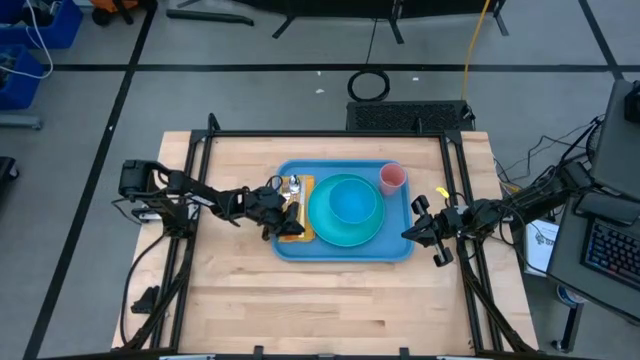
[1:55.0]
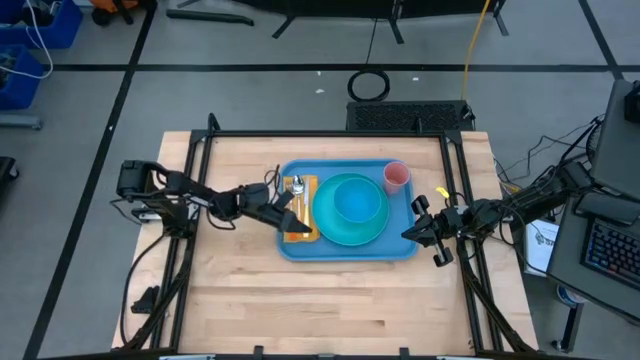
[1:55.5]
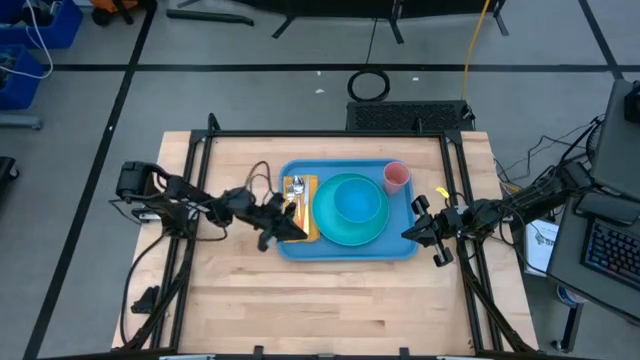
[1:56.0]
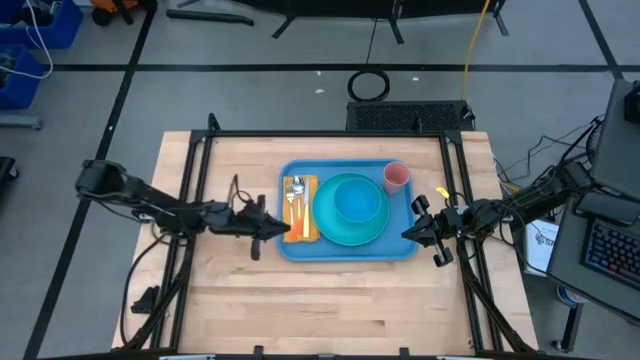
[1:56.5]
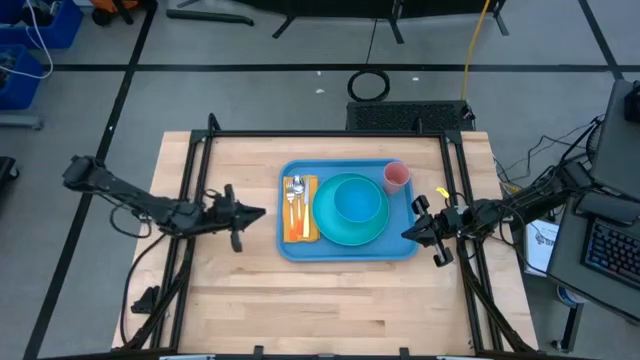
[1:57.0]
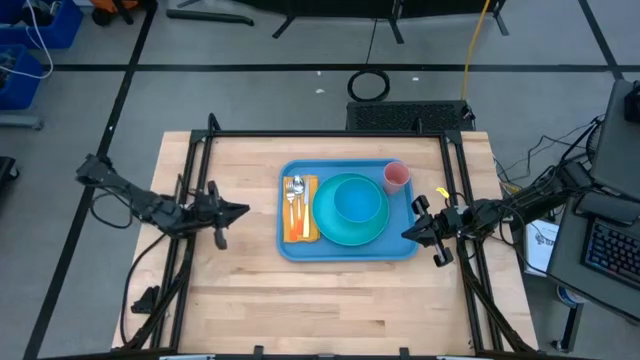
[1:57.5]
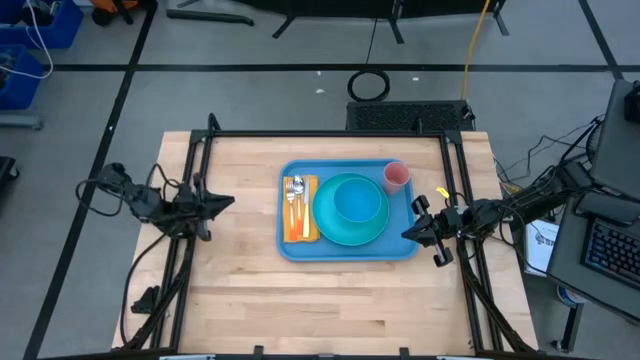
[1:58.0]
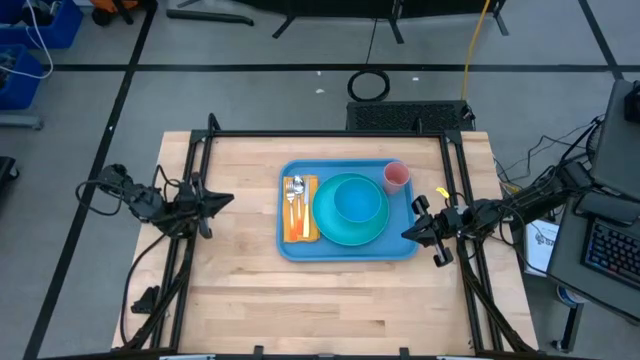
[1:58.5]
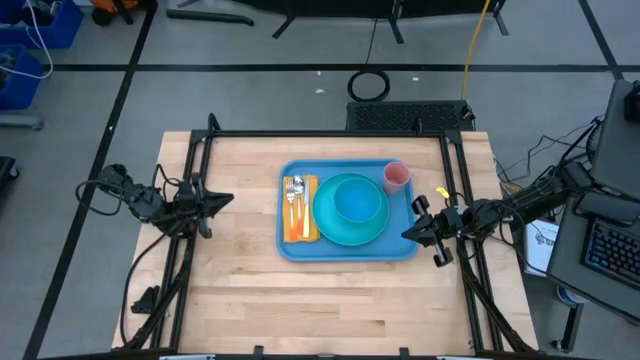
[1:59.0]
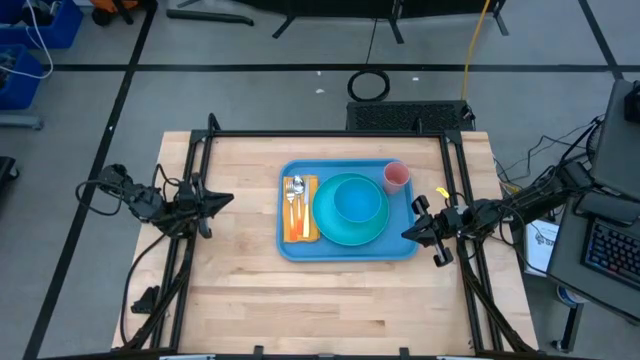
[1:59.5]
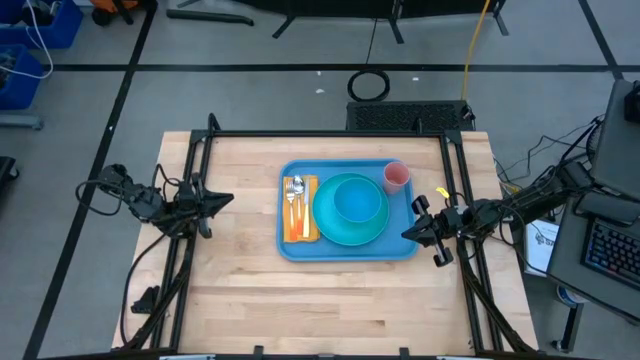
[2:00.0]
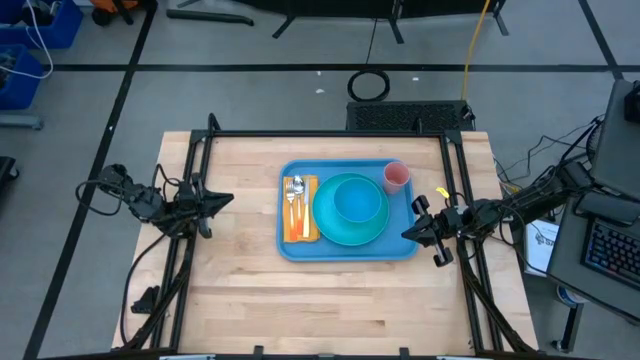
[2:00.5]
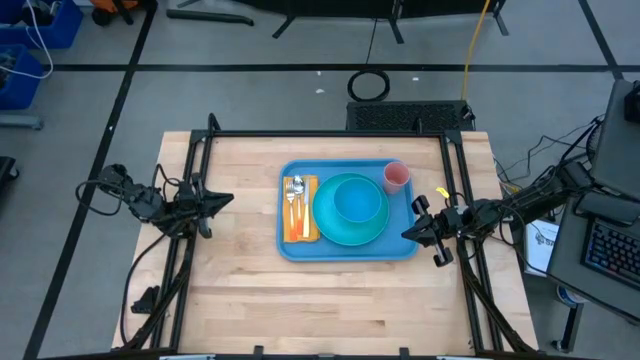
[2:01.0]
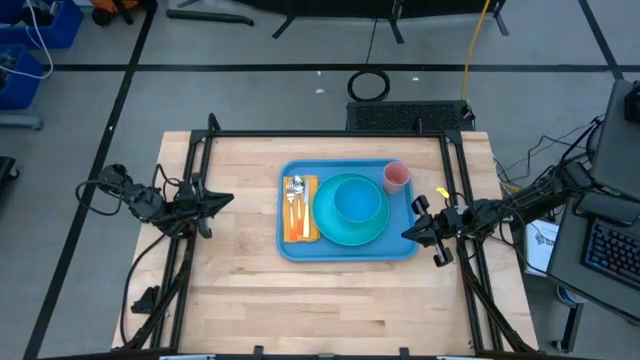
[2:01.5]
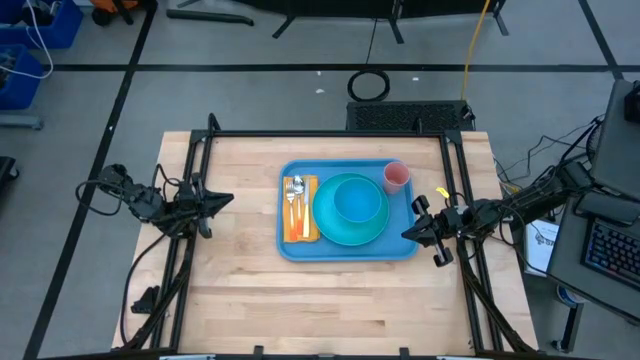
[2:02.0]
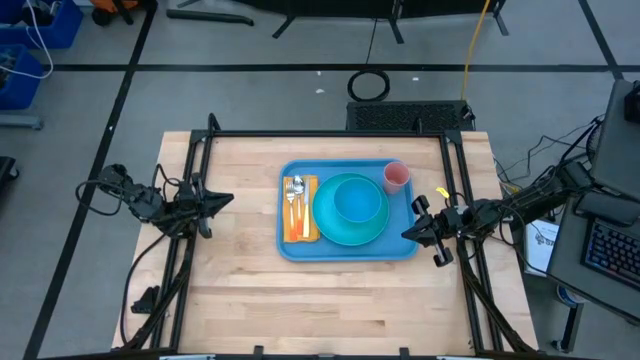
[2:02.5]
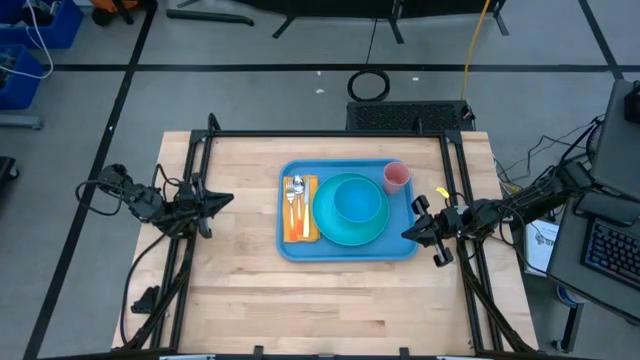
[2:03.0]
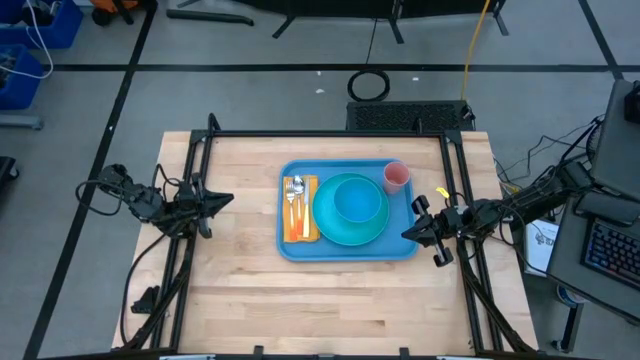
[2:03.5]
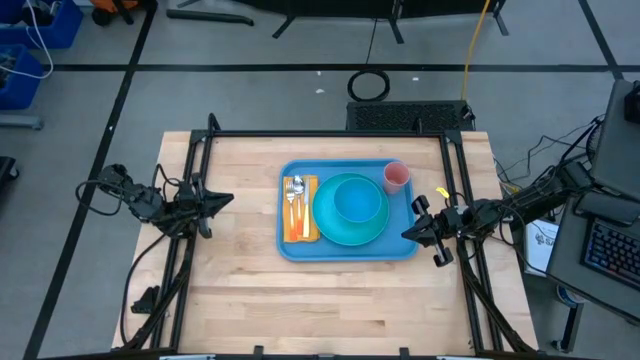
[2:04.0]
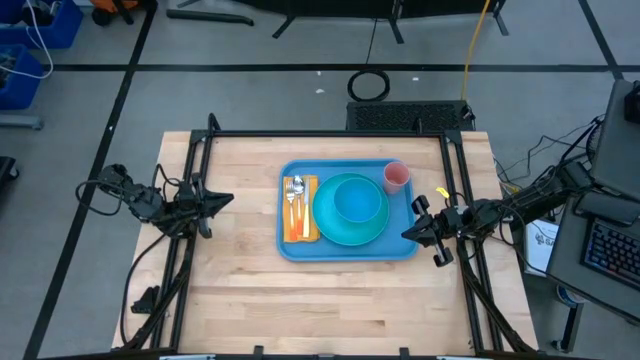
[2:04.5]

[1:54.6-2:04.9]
Task: Set up tray
Return to Home Position

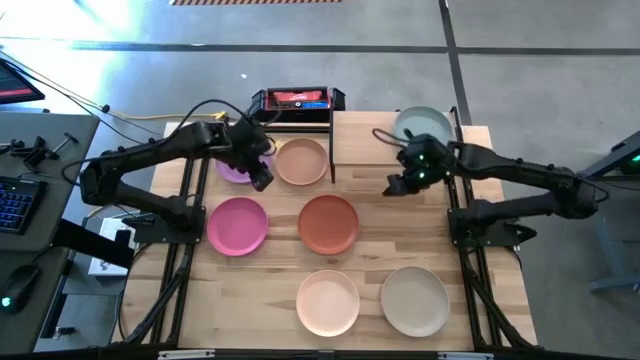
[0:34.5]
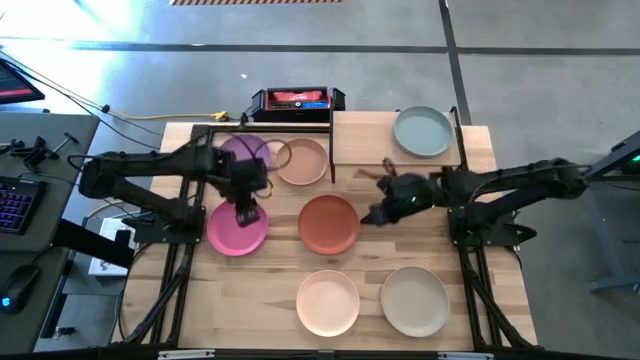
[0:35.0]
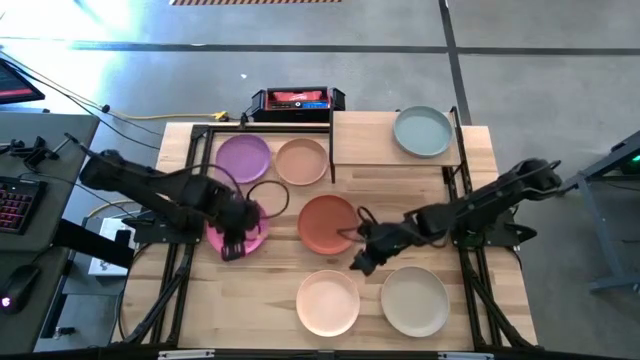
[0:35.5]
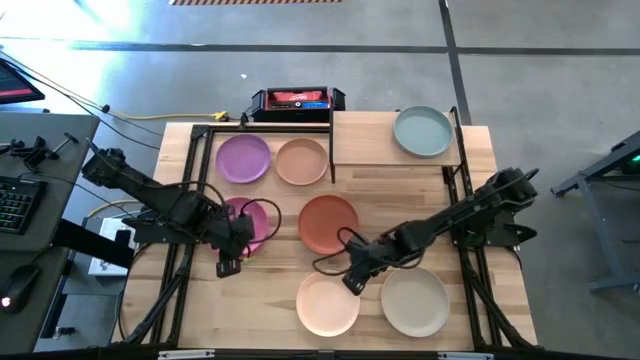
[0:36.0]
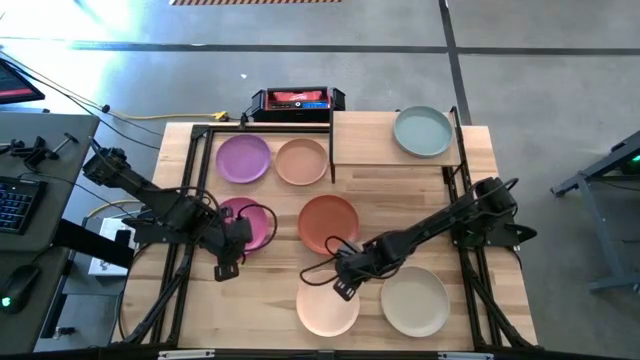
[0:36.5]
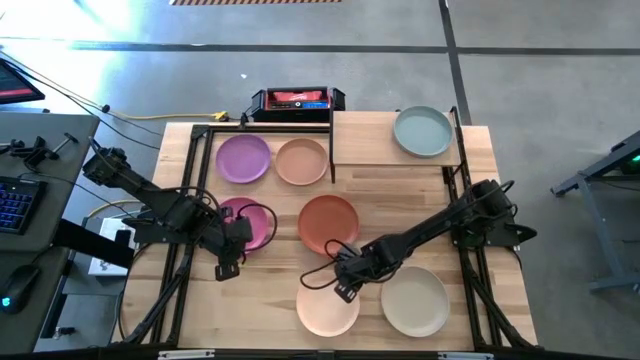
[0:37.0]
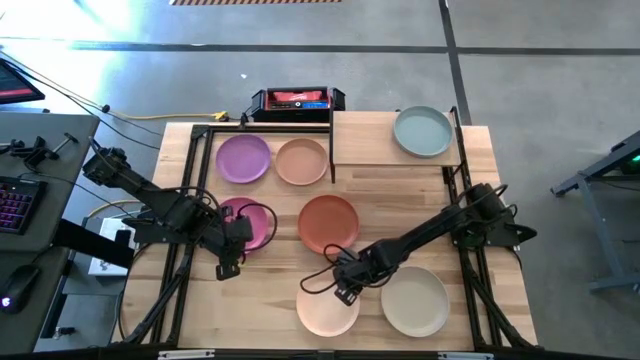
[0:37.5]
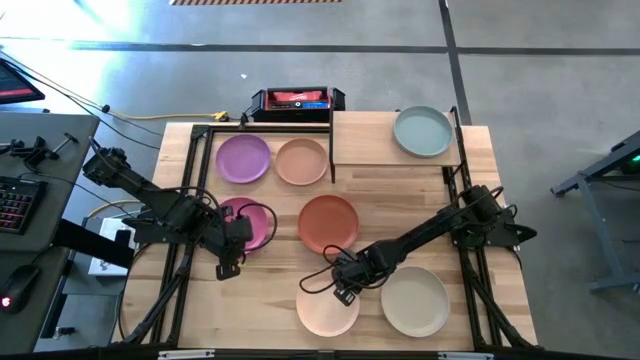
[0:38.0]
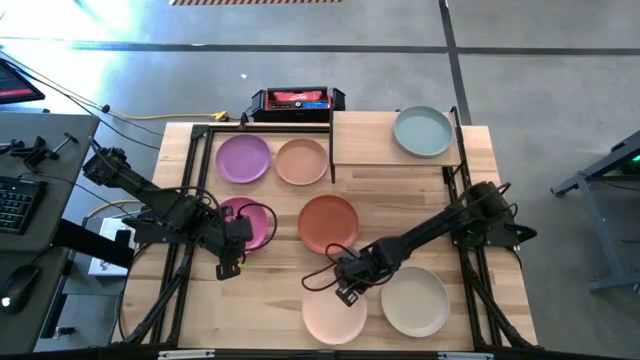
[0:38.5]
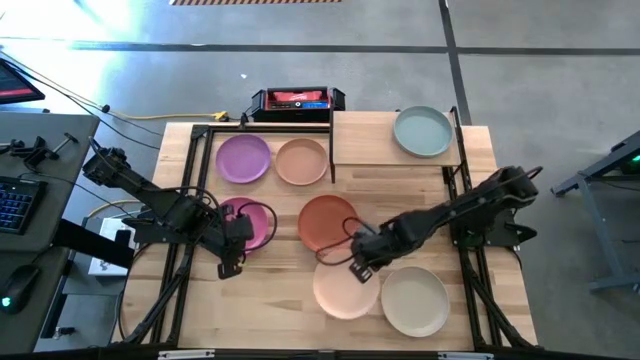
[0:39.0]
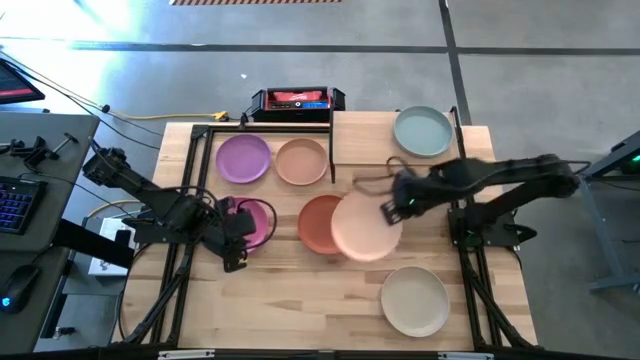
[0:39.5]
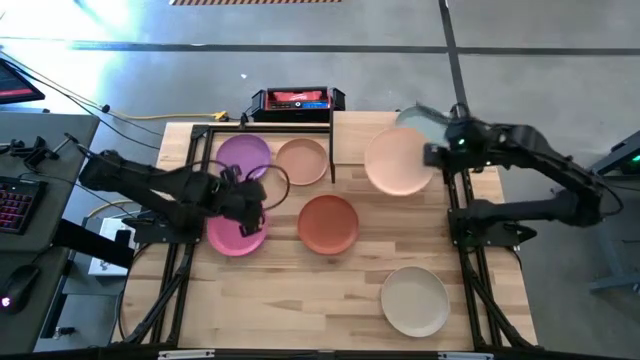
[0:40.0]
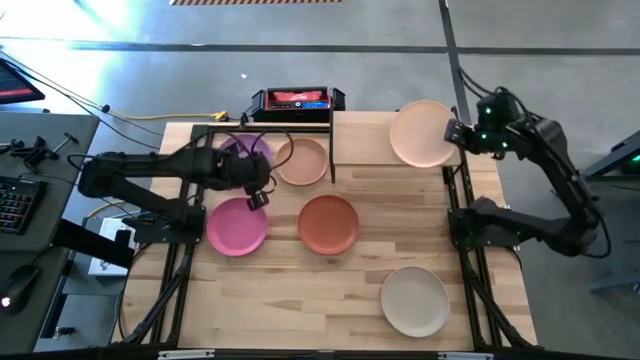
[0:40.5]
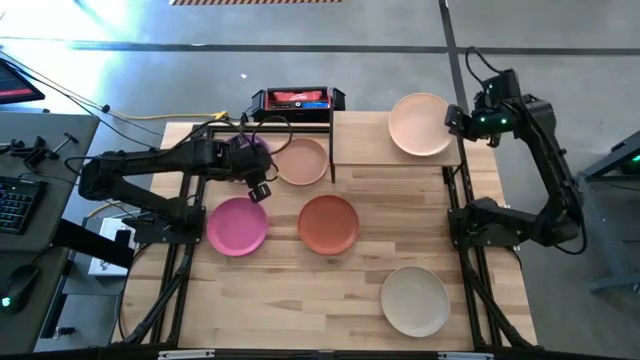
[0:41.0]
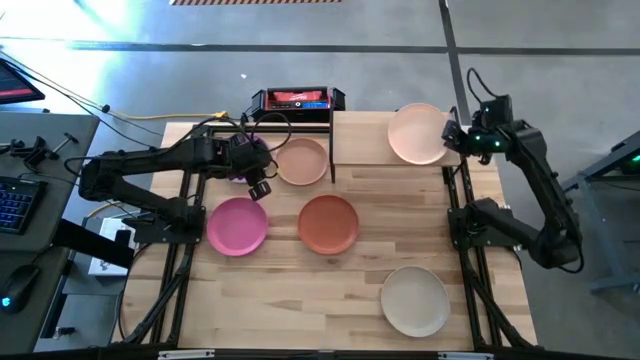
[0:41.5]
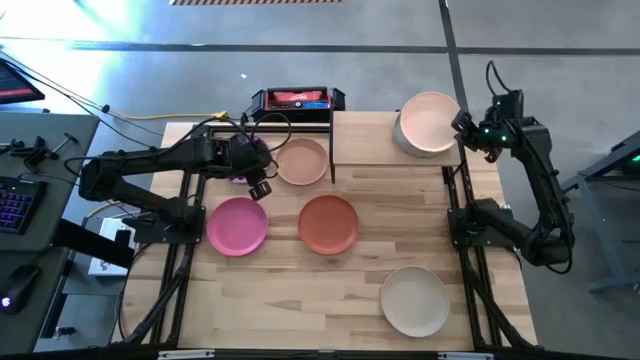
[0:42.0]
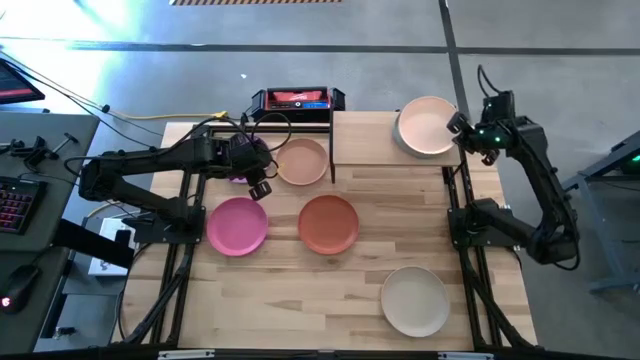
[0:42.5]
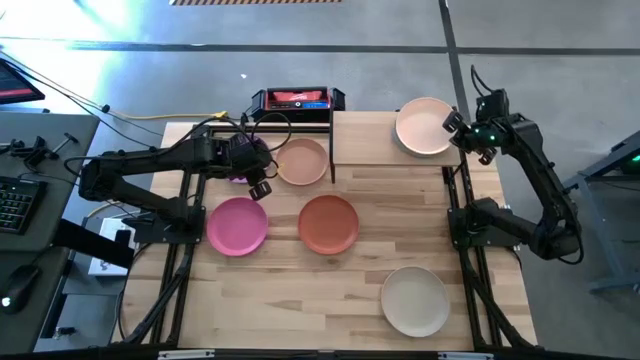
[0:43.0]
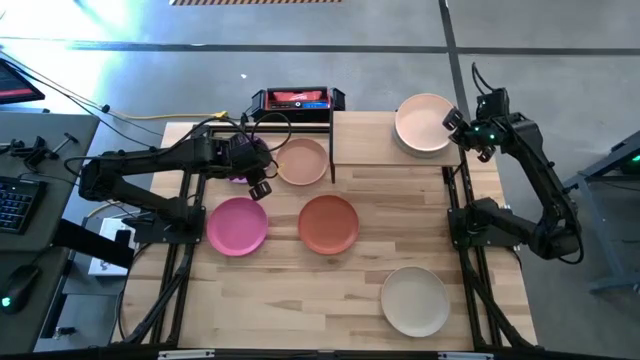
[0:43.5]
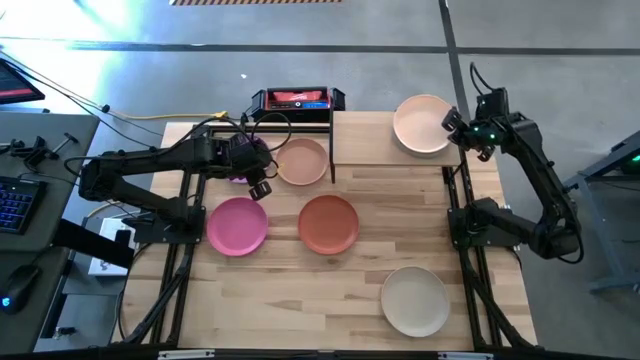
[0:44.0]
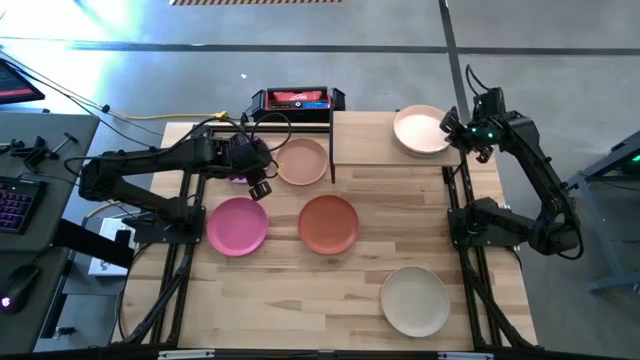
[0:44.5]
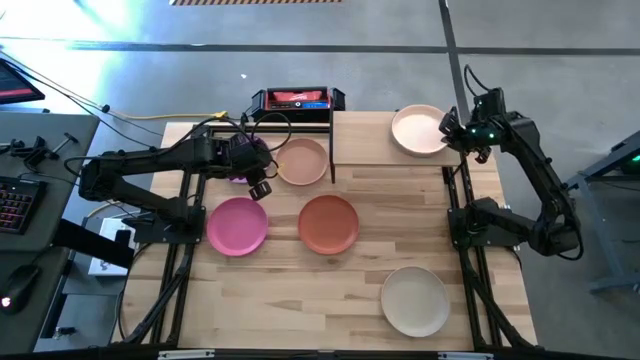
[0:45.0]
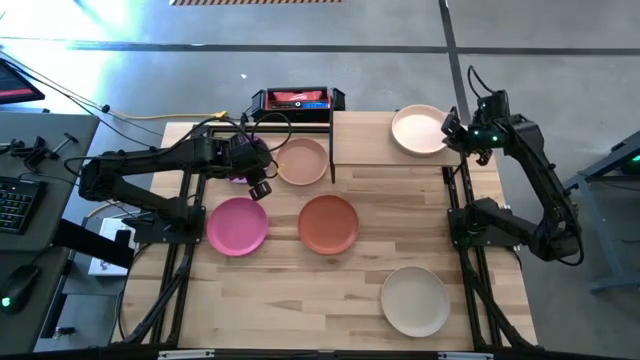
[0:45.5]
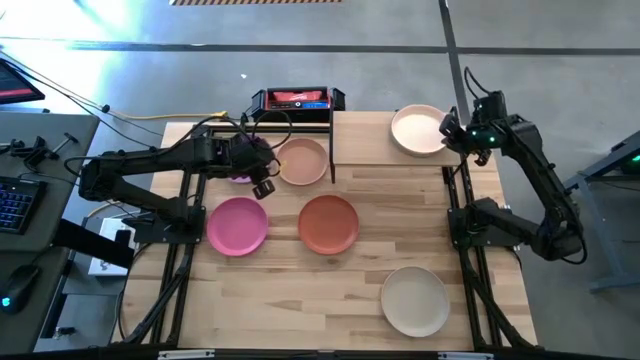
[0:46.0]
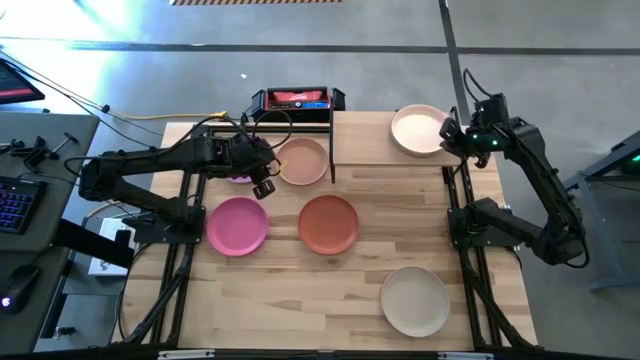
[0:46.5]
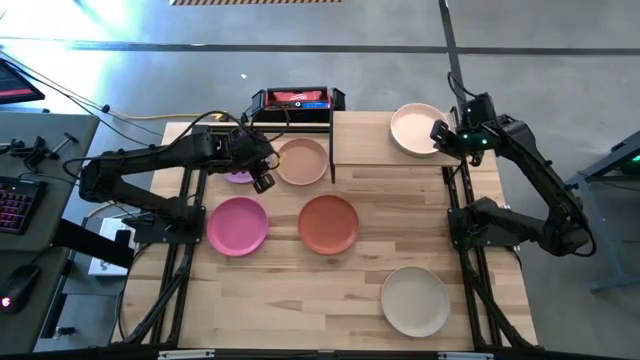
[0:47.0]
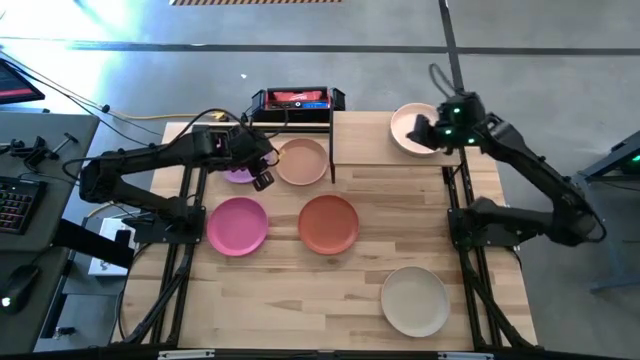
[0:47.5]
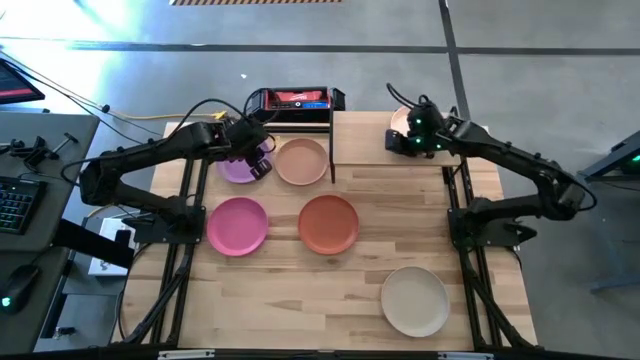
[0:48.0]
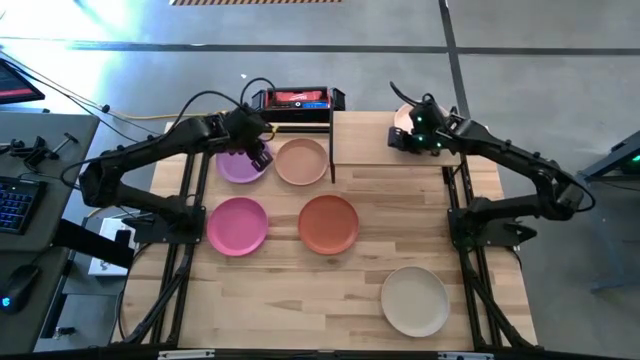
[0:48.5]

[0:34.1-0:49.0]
Task: Place and stack plates onto a shelf
Stack the light orange plate on top of the light blue plate on the shelf
